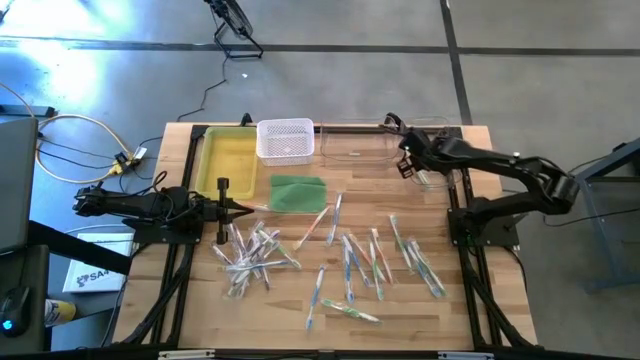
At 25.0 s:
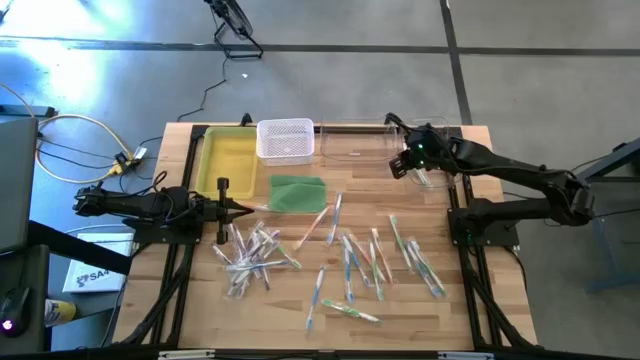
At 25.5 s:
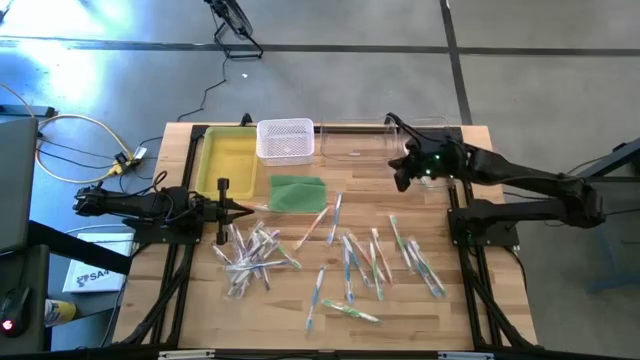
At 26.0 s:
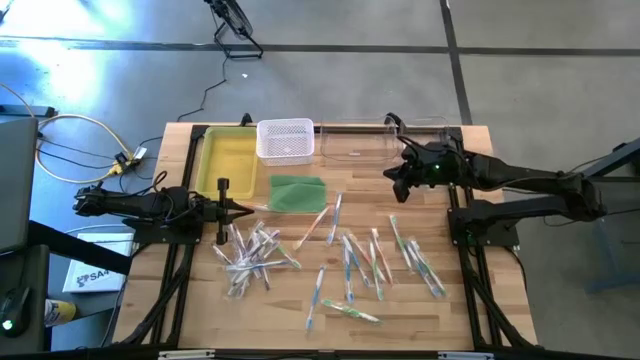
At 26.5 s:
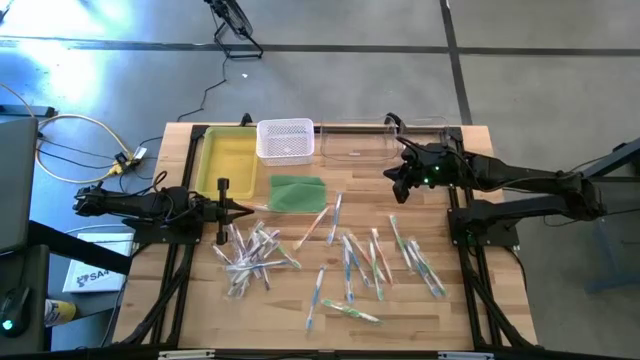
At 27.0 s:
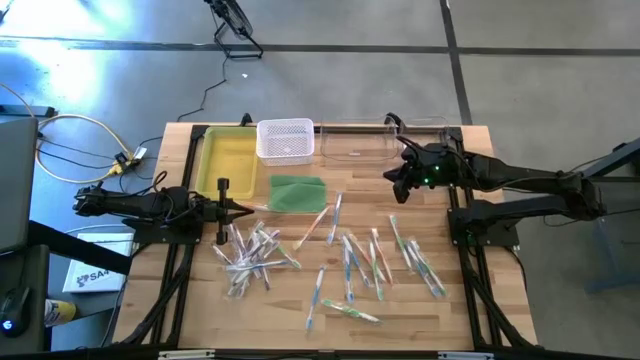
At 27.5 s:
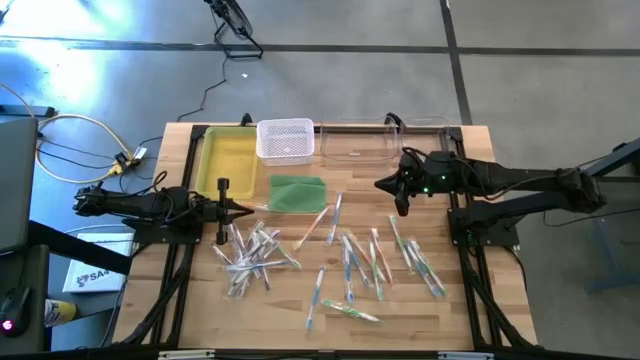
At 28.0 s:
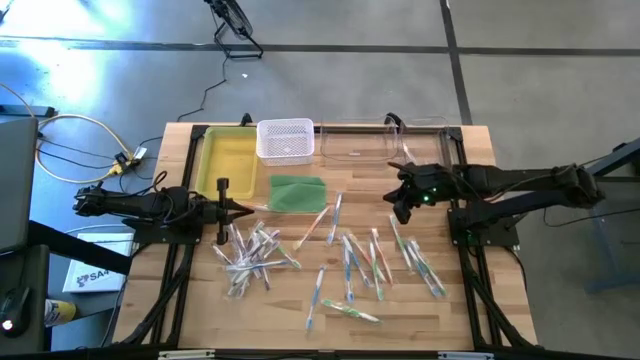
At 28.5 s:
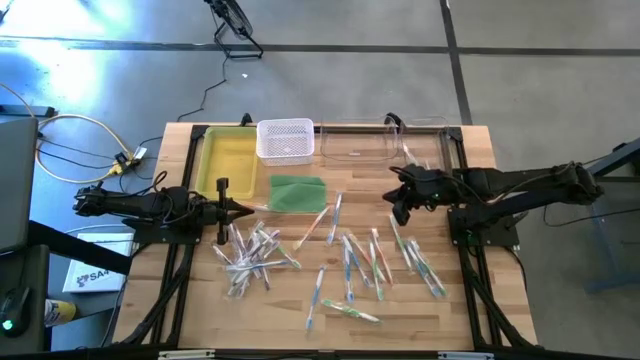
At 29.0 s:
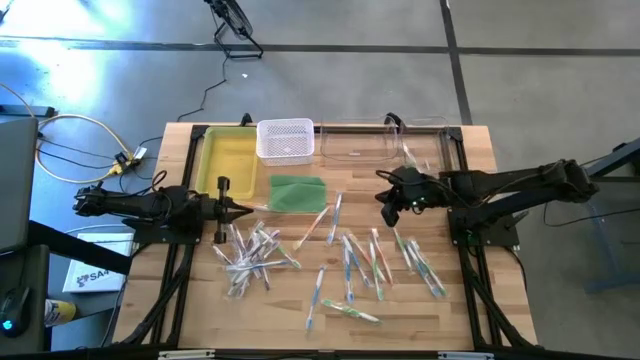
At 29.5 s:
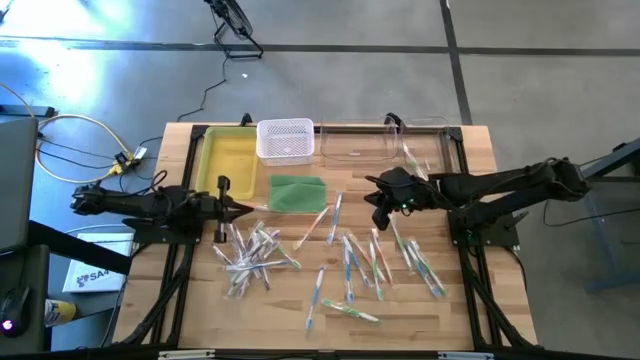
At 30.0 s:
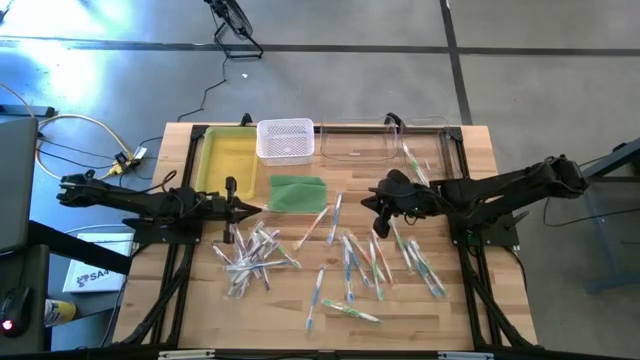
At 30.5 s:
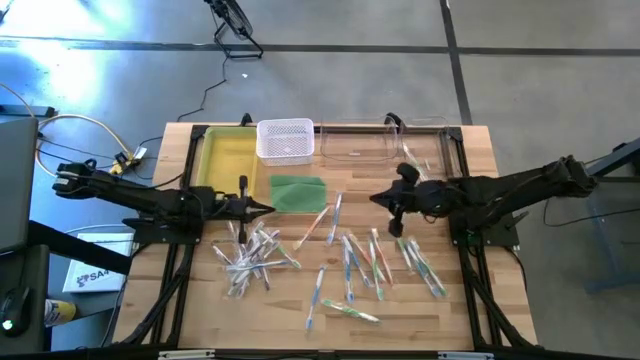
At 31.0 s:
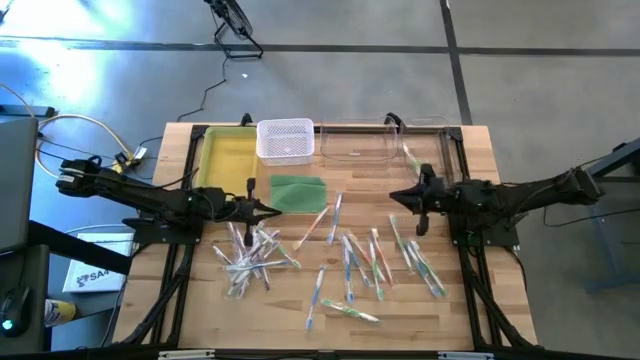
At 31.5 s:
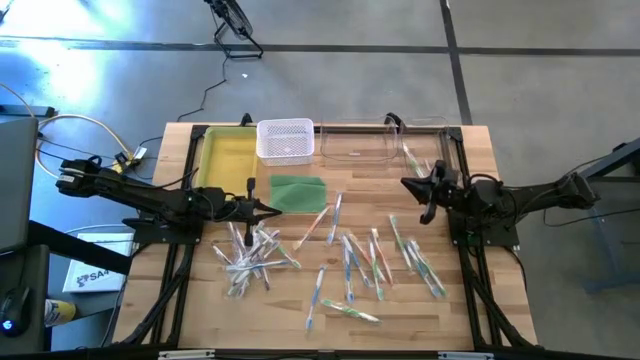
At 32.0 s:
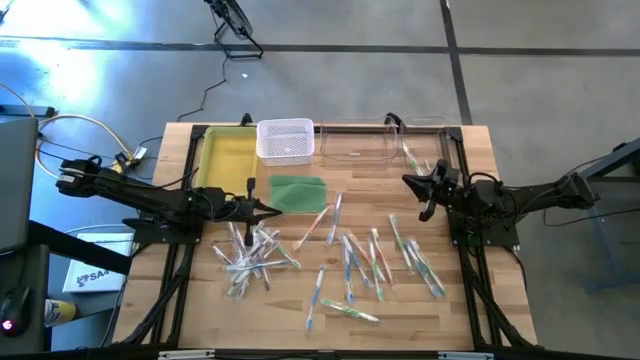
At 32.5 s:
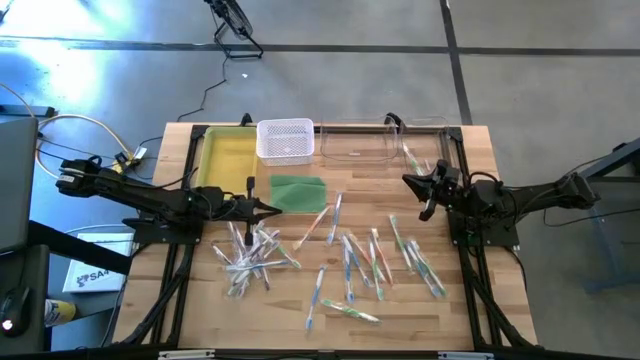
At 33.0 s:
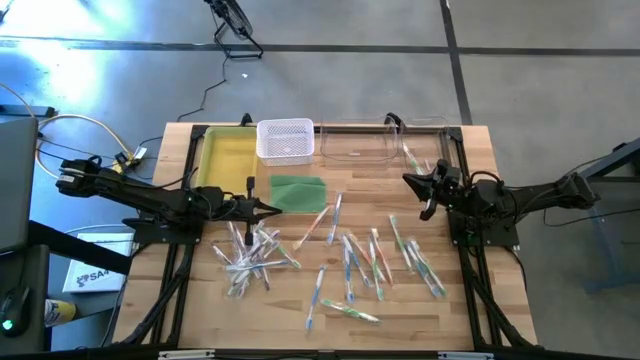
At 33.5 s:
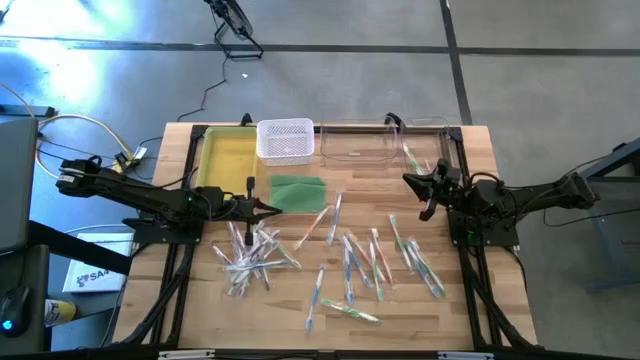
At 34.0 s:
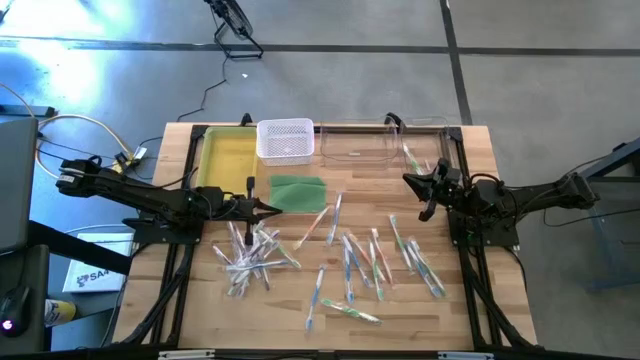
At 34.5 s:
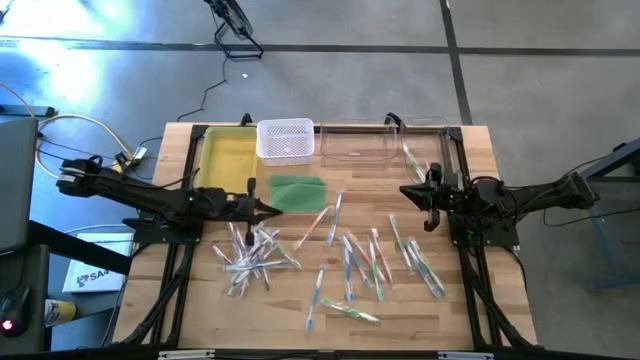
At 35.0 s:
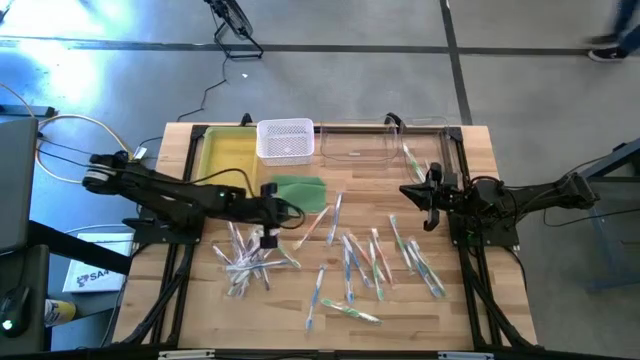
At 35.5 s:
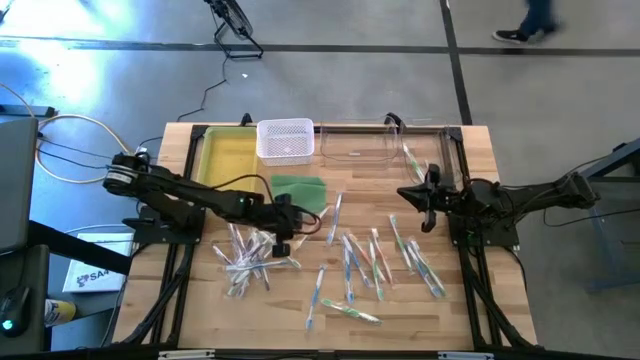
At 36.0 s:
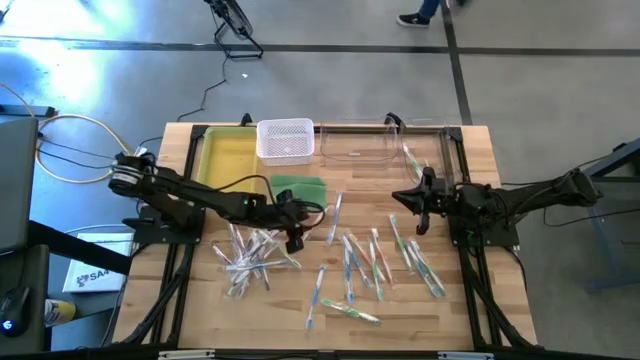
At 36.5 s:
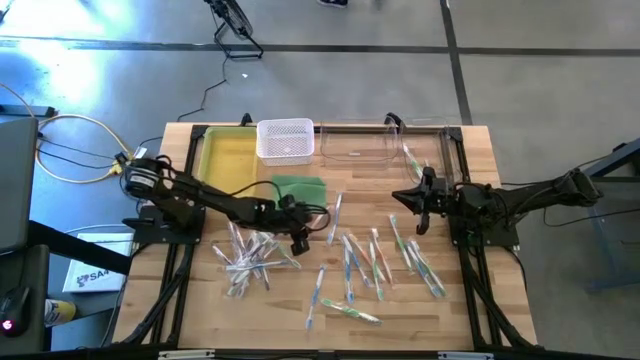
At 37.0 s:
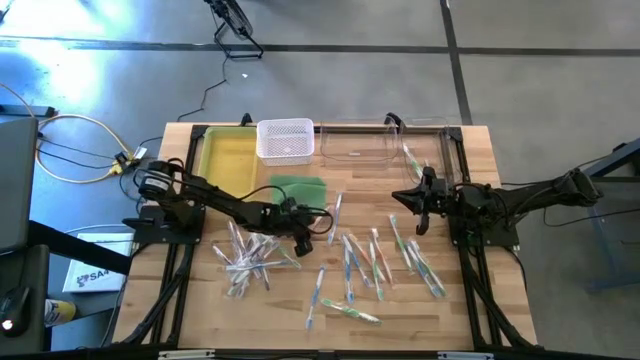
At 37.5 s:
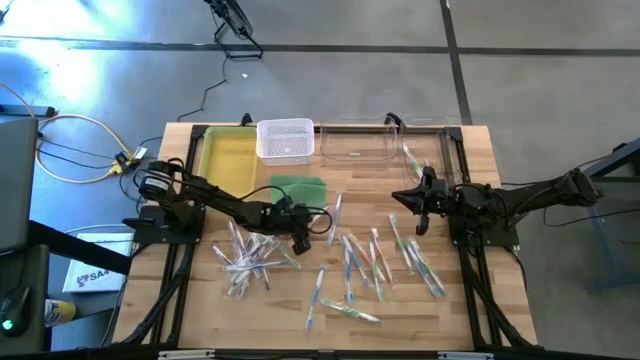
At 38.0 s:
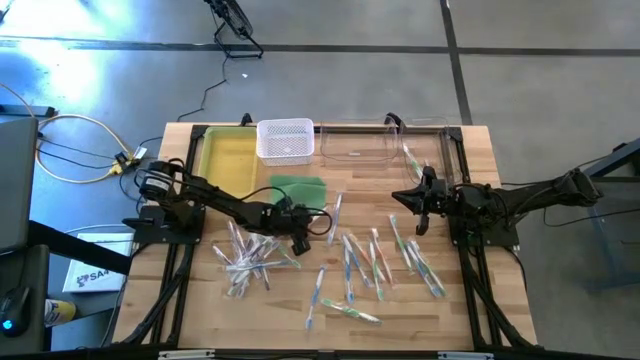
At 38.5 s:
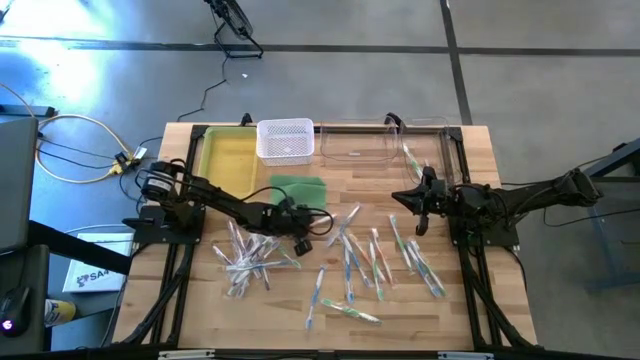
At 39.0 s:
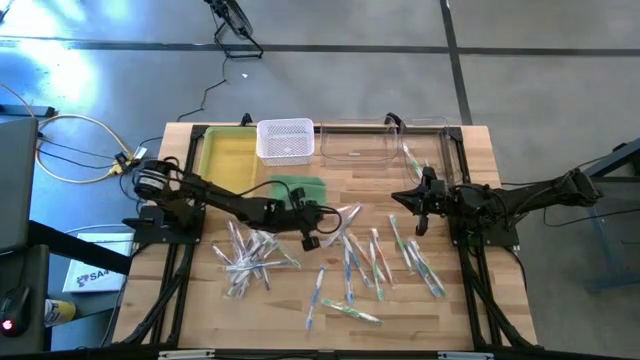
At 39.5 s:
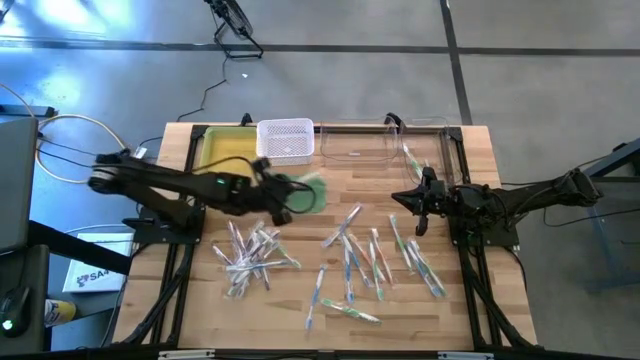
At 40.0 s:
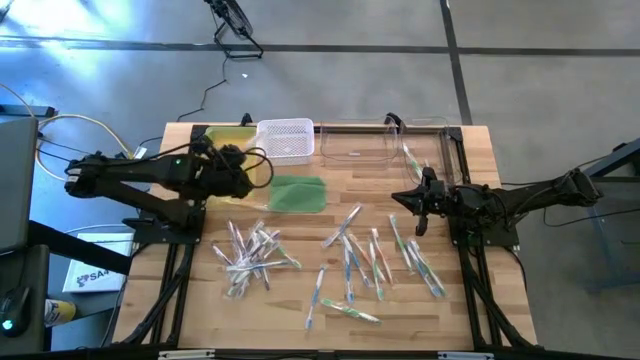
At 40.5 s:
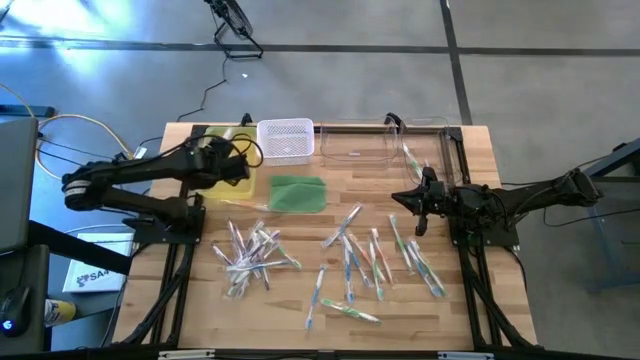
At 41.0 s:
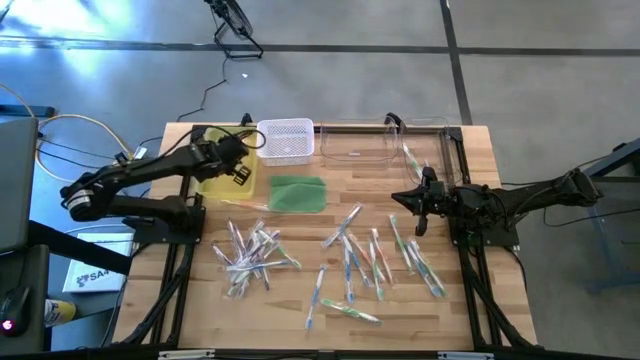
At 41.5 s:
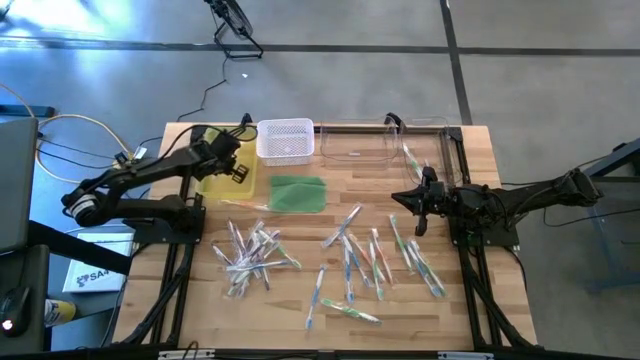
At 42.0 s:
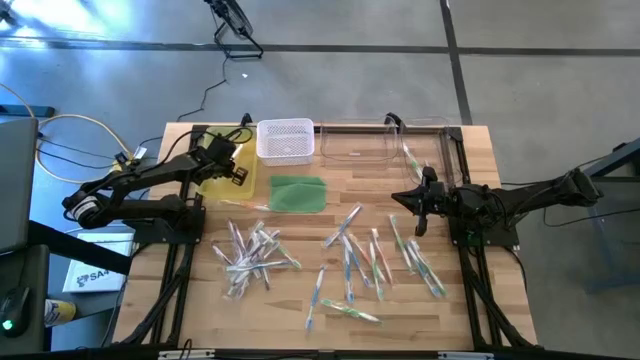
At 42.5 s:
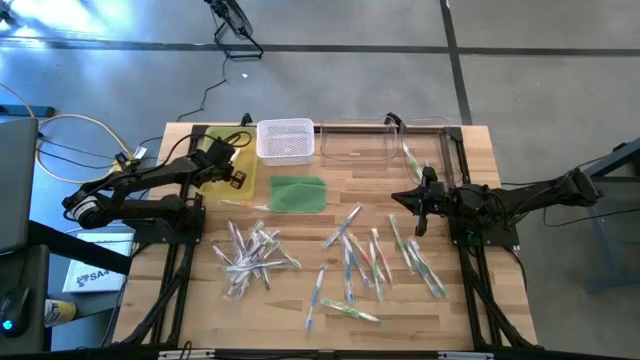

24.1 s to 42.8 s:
Task: Pick & Place Toothbrushes
Put the orange toothbrush into the yellow bin

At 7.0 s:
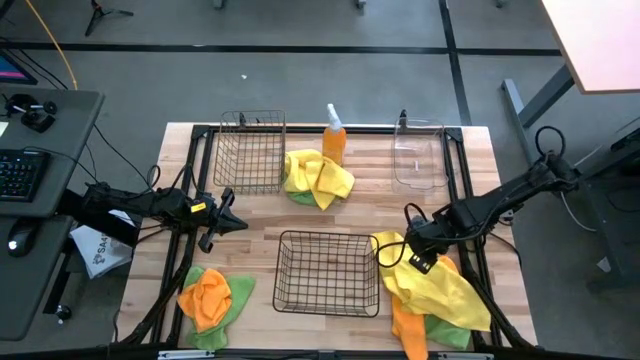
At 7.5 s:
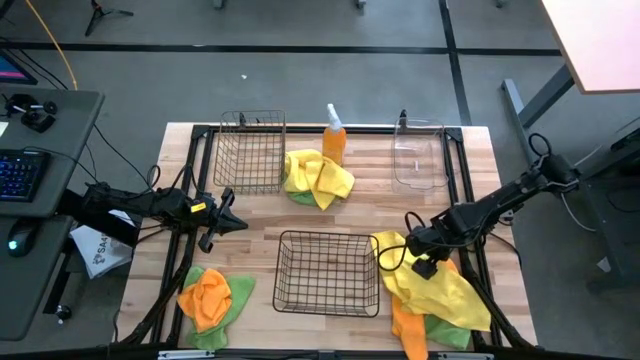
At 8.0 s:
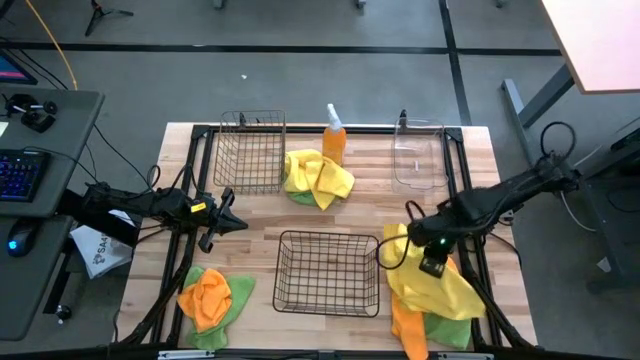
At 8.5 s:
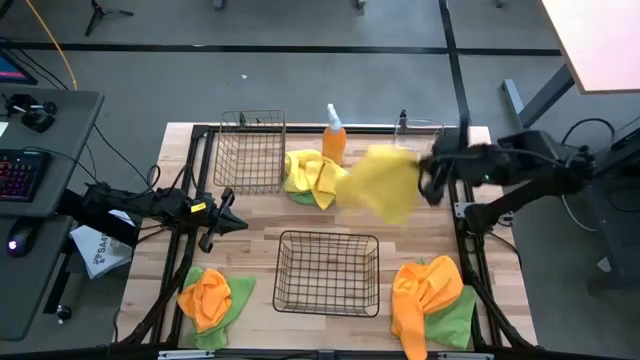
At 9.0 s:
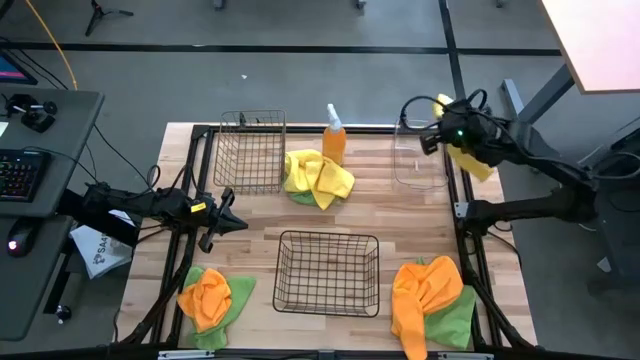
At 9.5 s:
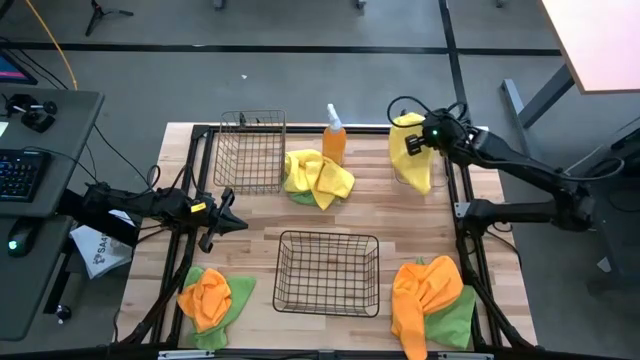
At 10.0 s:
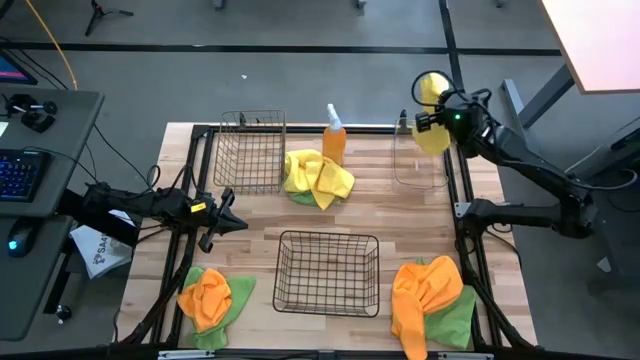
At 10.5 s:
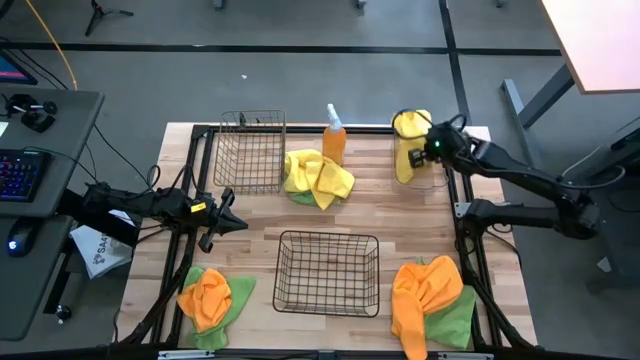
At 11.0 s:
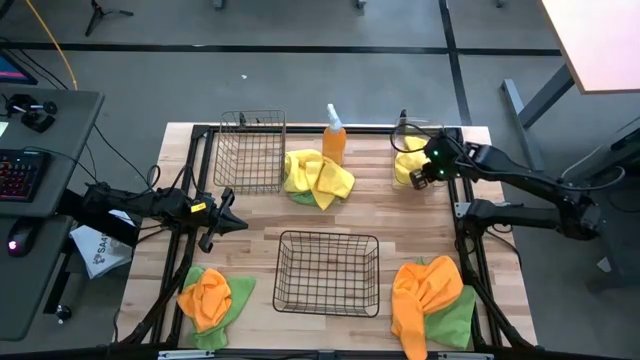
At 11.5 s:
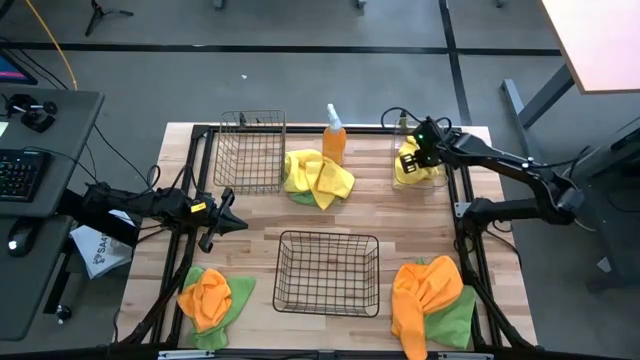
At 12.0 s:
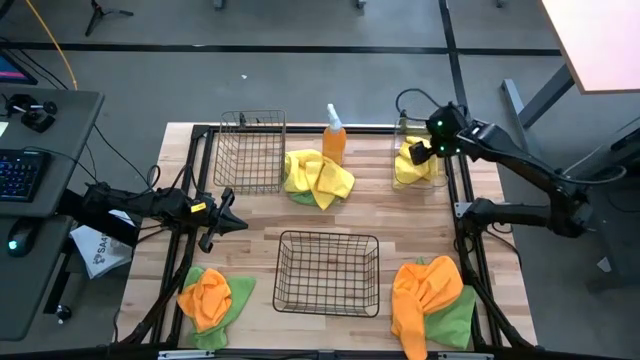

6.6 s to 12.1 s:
Task: Sort microfiber towel by color & place in baskets
Put the bottom yellow microfiber towel into the transparent bin
